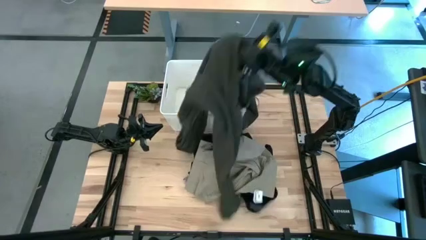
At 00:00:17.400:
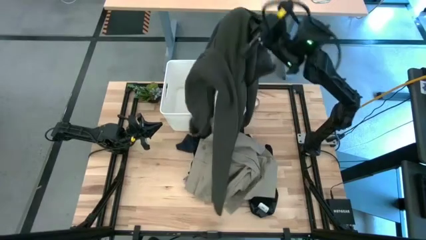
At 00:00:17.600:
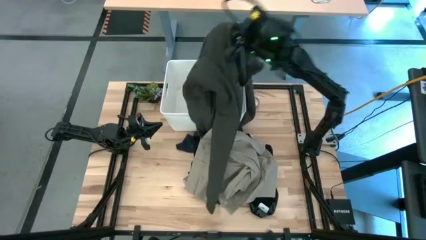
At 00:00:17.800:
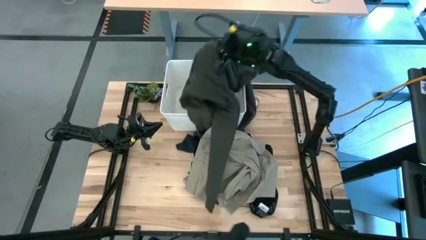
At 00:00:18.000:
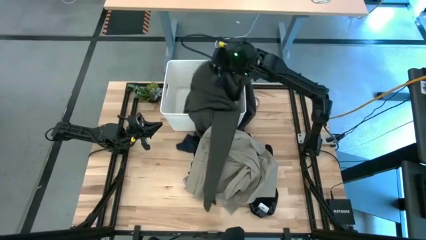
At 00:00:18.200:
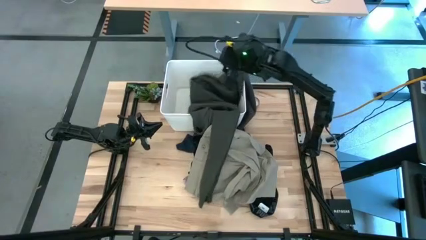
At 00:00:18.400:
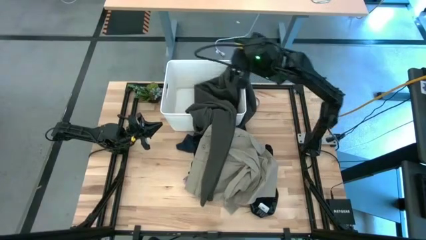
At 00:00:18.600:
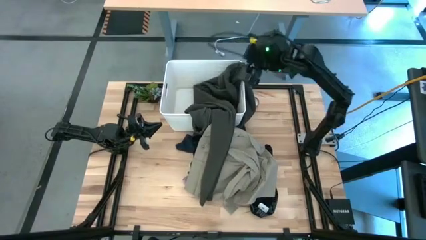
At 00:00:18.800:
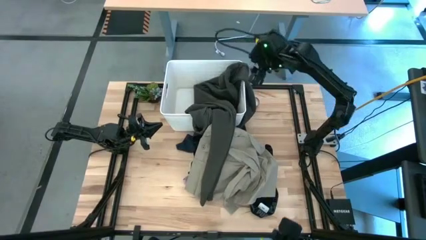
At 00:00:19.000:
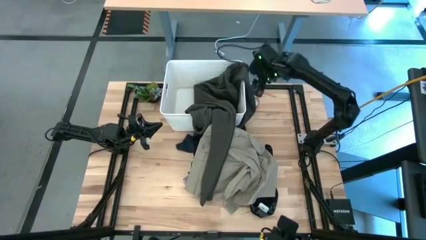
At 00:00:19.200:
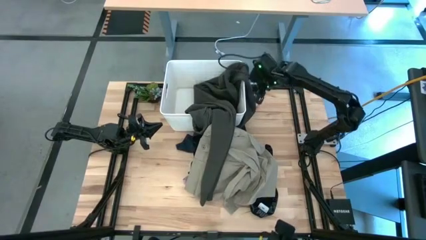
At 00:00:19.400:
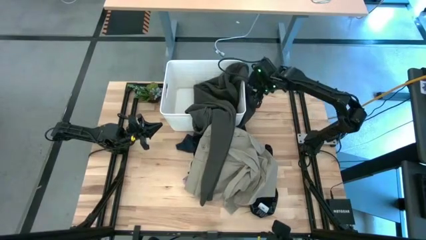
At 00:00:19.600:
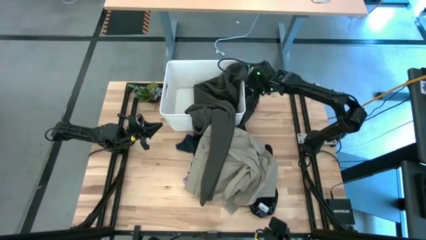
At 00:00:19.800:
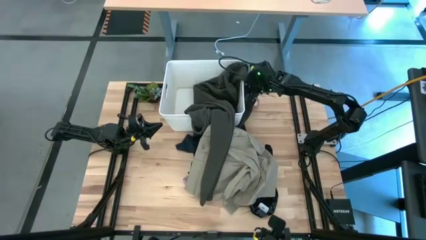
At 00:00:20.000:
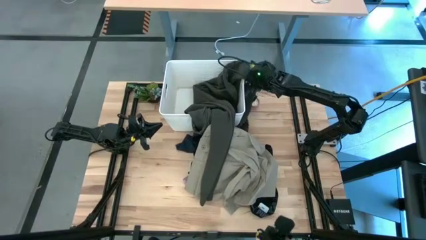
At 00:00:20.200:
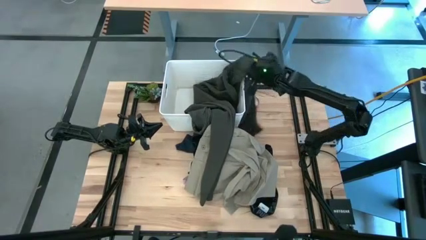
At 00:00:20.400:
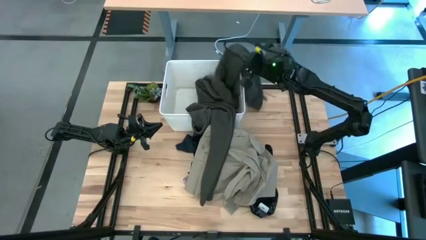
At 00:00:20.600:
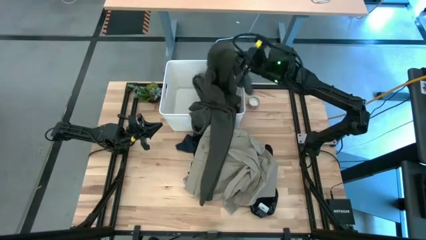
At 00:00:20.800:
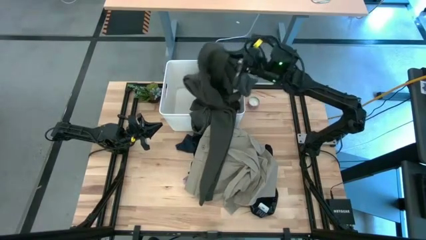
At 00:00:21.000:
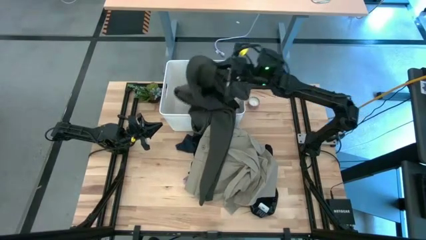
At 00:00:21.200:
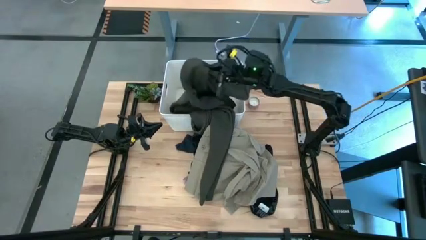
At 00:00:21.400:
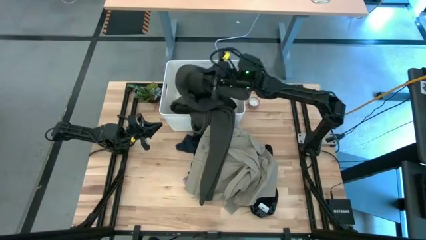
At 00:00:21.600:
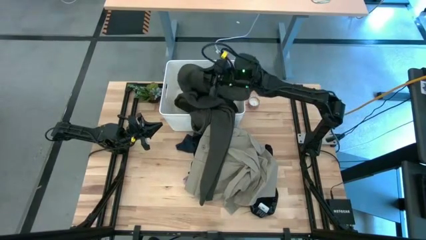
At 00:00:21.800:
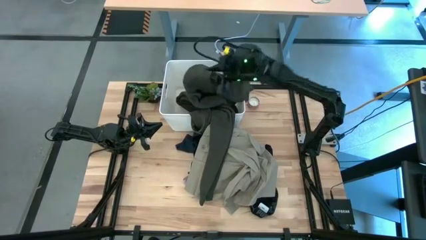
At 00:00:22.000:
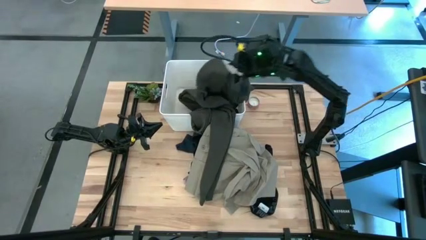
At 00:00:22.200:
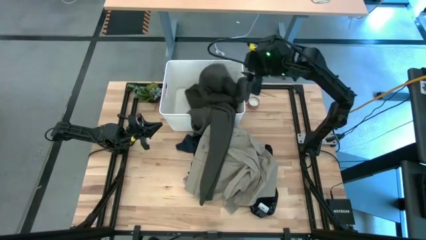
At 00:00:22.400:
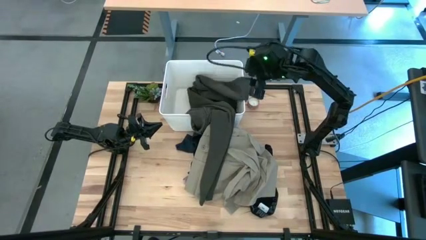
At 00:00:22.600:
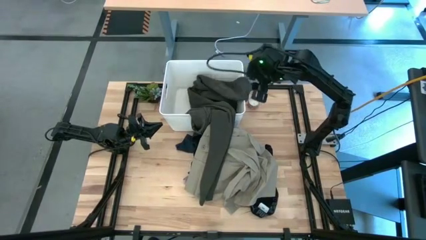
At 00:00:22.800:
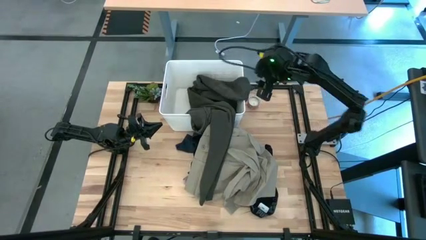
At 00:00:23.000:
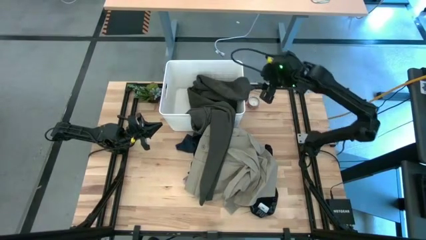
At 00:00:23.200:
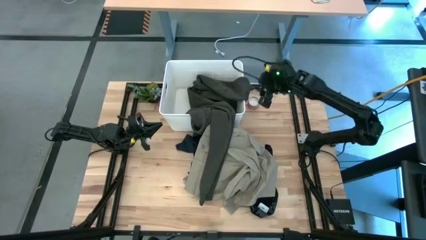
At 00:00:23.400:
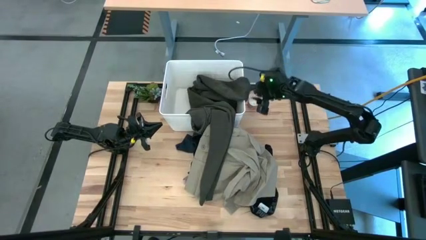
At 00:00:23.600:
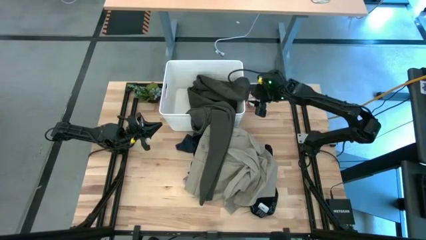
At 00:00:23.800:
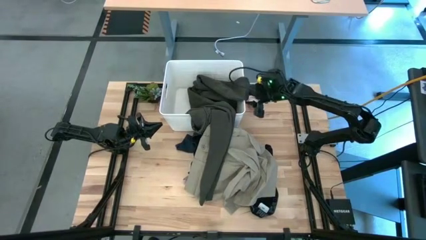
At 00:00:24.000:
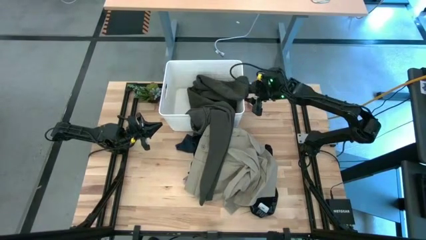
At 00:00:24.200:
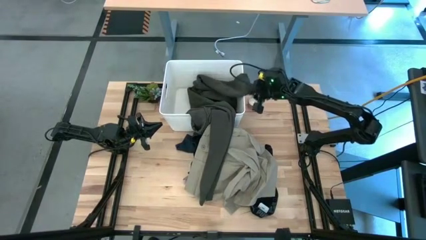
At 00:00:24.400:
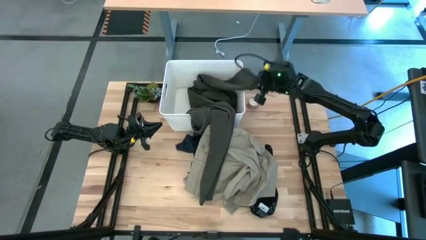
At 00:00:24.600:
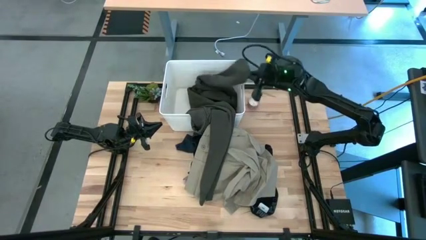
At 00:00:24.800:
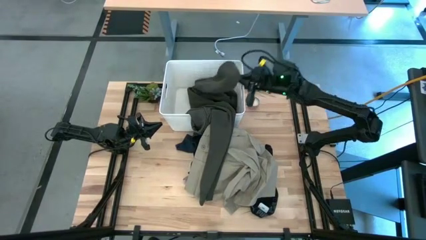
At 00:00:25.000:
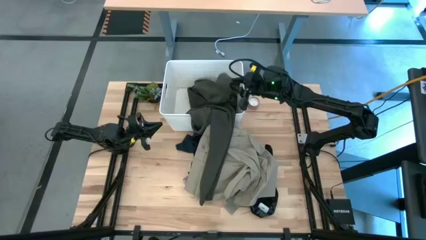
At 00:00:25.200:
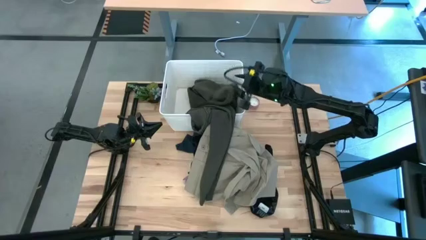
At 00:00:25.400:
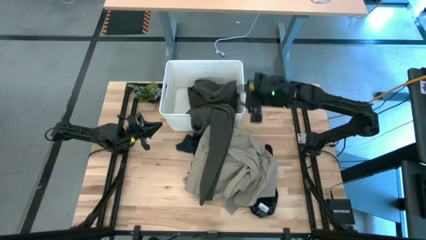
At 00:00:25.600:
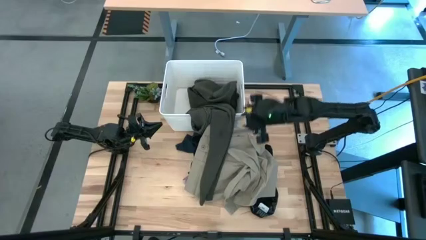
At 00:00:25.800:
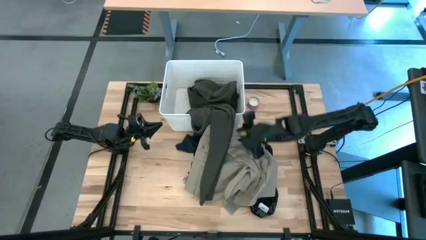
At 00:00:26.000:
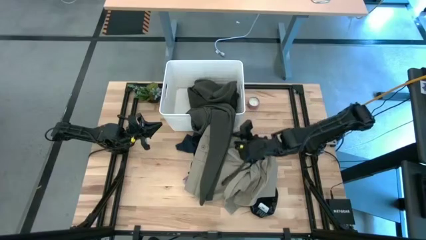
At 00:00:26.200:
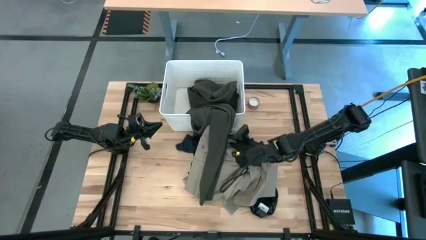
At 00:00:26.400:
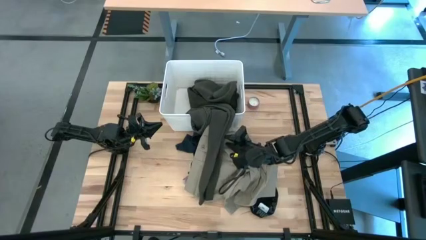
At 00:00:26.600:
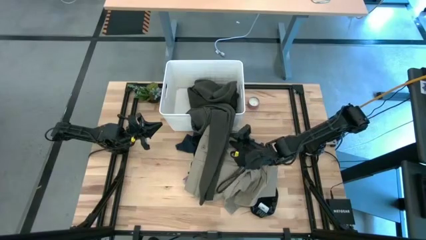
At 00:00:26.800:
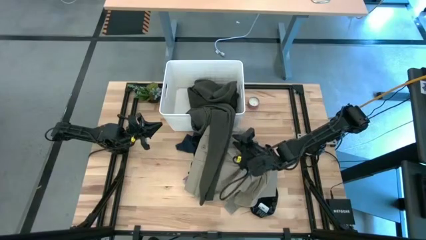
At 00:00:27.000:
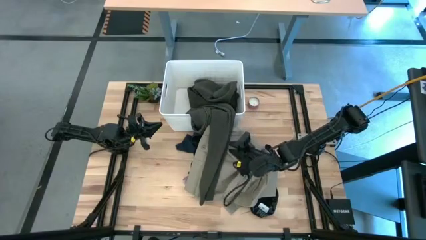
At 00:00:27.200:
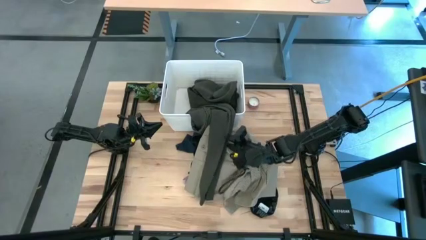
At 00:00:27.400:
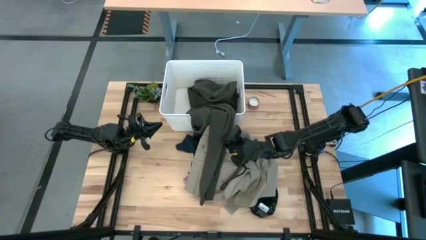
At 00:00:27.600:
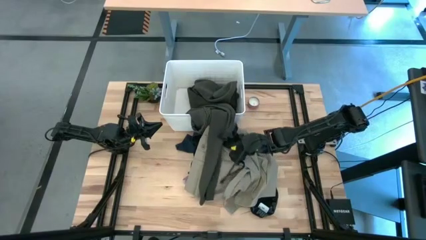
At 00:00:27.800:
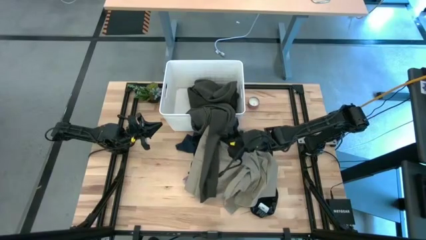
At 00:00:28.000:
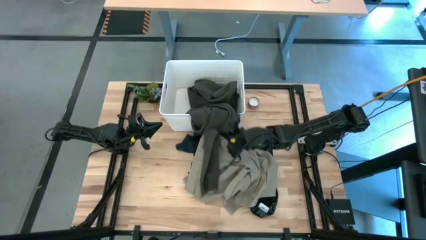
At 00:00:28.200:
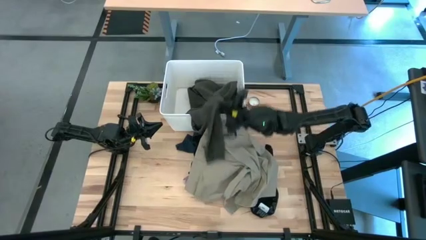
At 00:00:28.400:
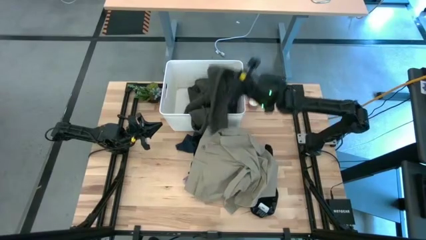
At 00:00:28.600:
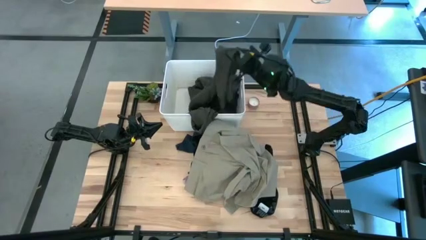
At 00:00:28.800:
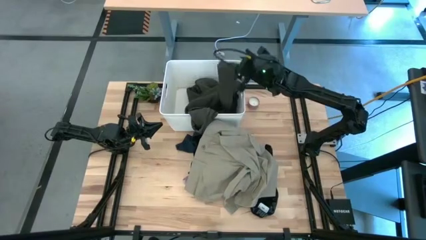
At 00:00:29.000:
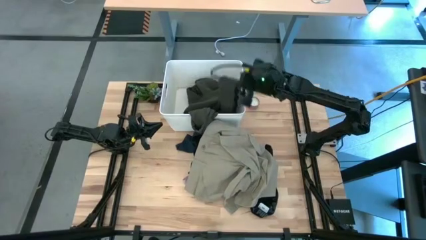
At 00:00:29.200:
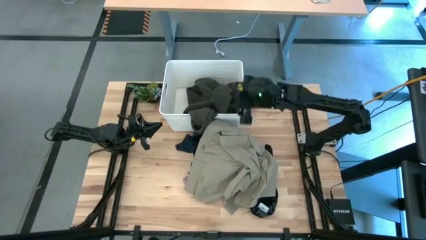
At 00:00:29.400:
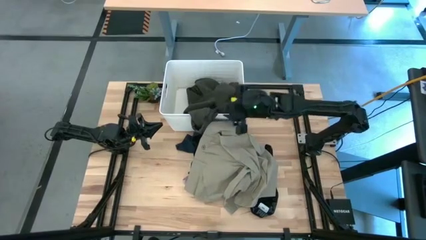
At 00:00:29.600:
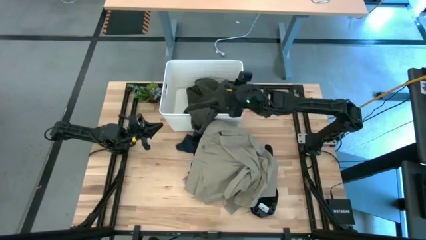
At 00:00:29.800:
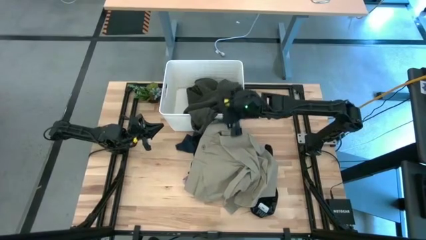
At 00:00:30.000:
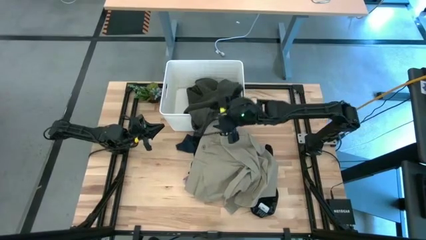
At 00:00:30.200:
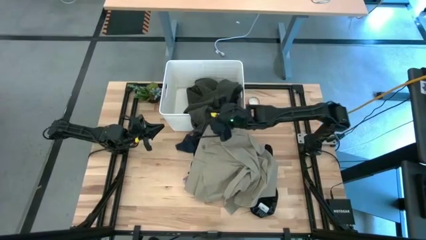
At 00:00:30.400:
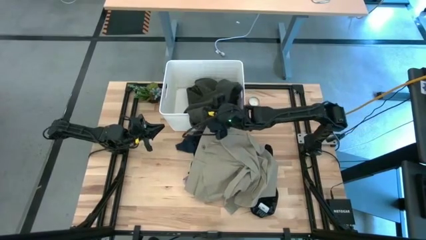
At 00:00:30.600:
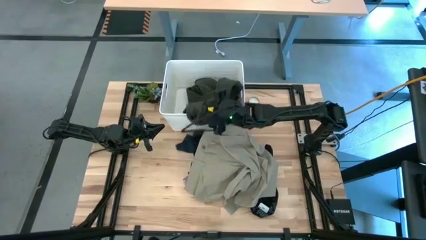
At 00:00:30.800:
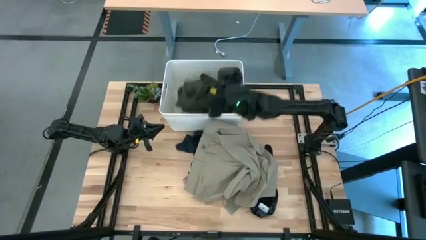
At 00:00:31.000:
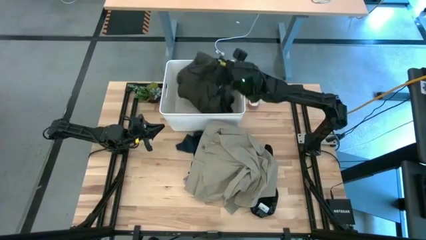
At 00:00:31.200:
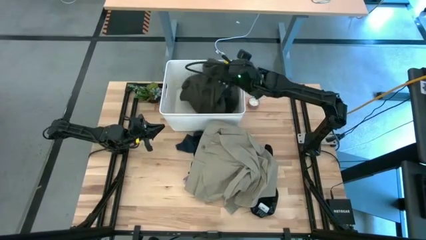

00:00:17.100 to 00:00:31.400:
Task: Sort clothes
Put the green jacket into the white bin
